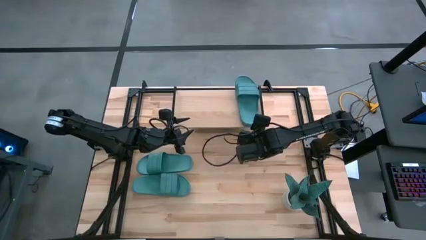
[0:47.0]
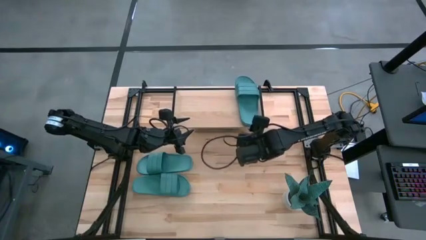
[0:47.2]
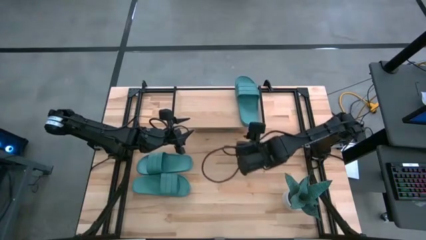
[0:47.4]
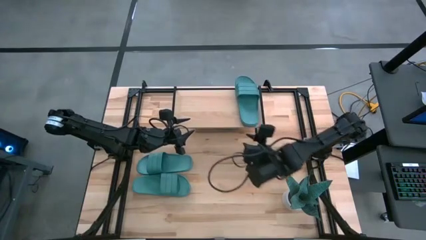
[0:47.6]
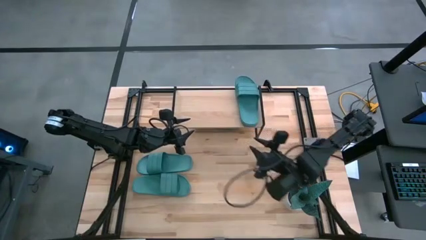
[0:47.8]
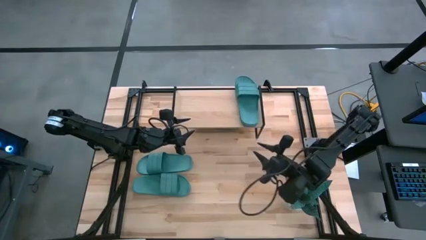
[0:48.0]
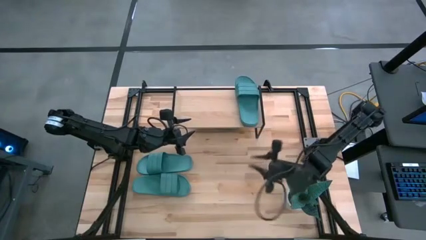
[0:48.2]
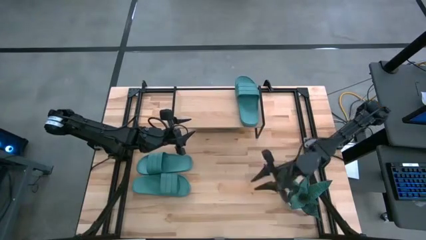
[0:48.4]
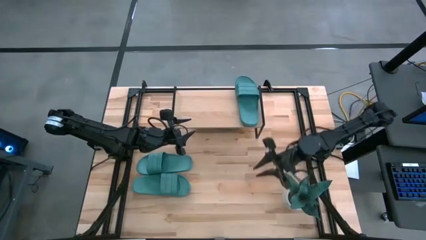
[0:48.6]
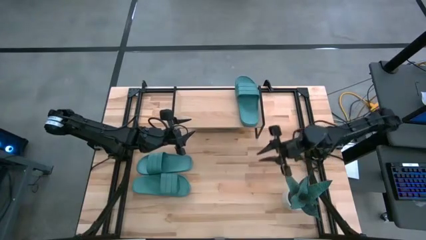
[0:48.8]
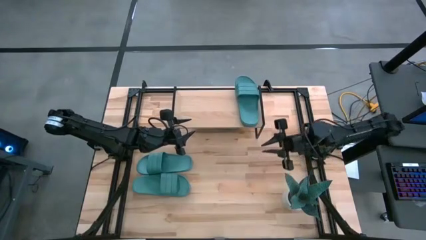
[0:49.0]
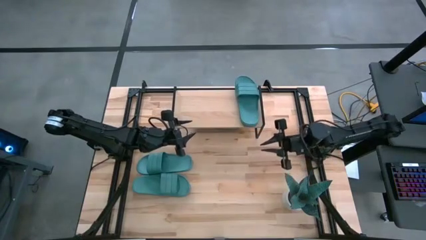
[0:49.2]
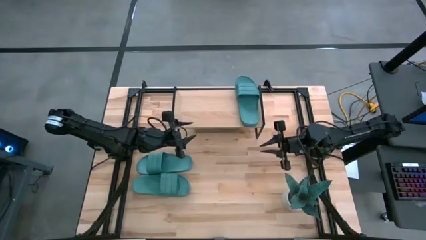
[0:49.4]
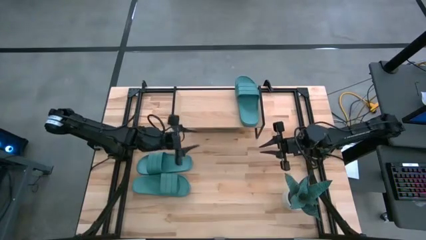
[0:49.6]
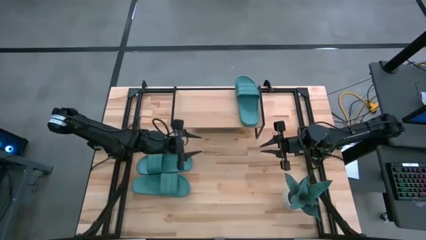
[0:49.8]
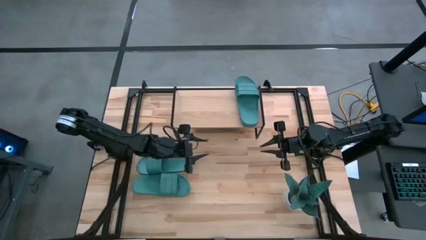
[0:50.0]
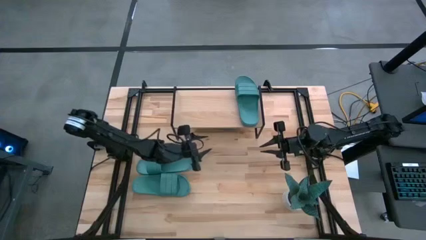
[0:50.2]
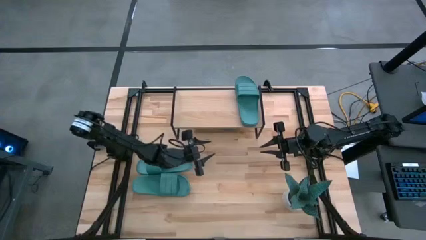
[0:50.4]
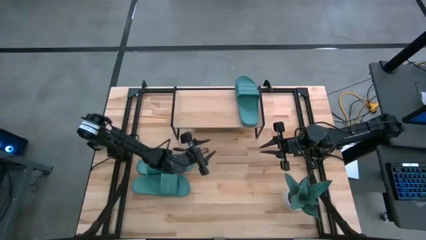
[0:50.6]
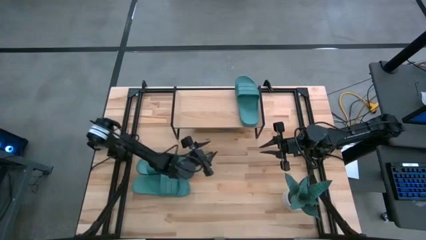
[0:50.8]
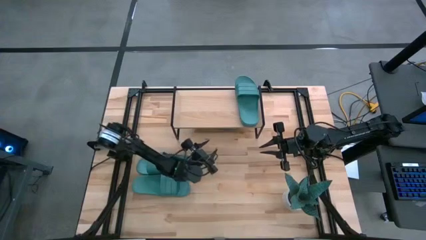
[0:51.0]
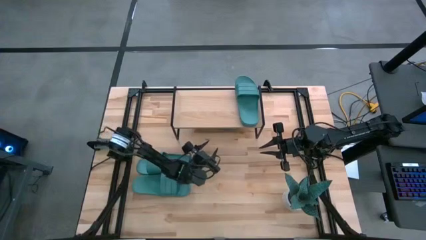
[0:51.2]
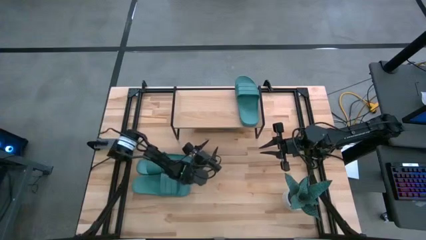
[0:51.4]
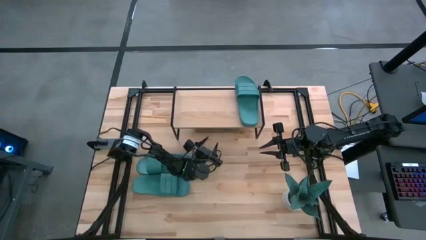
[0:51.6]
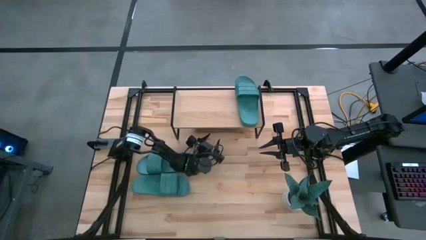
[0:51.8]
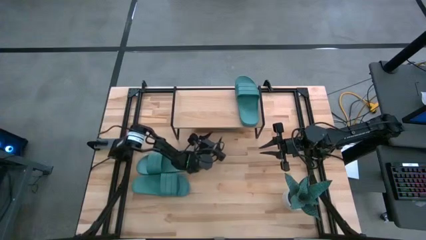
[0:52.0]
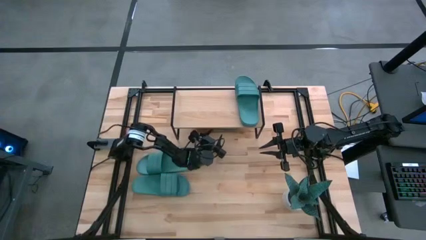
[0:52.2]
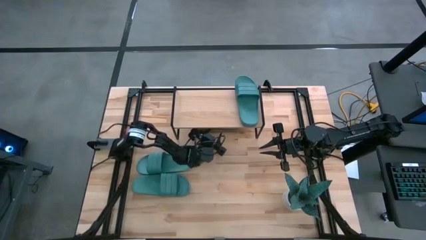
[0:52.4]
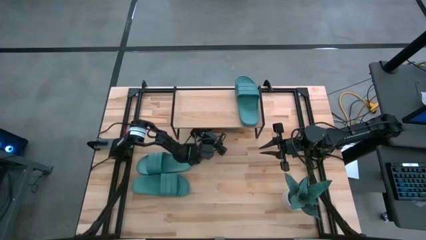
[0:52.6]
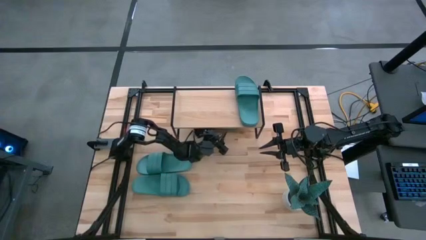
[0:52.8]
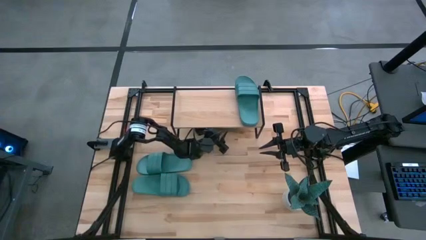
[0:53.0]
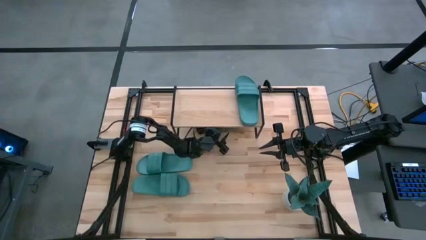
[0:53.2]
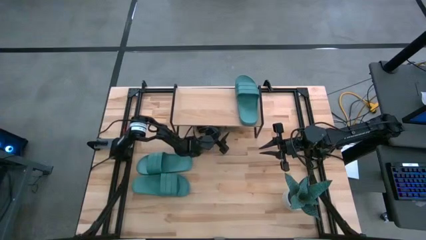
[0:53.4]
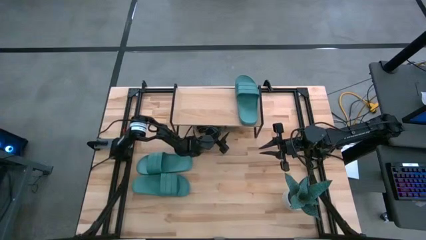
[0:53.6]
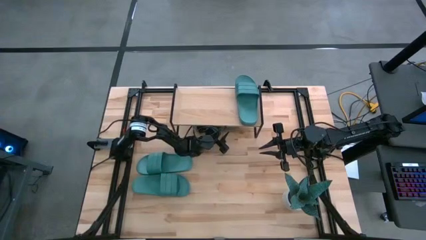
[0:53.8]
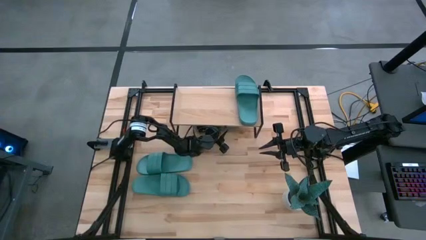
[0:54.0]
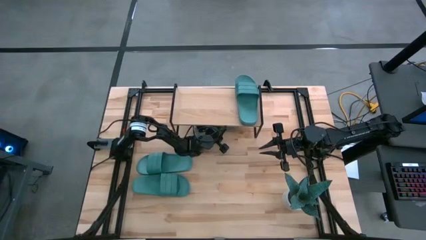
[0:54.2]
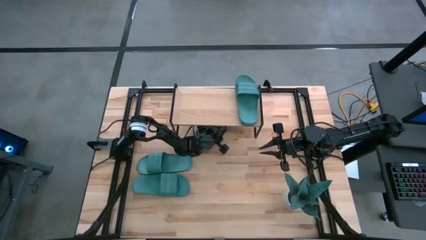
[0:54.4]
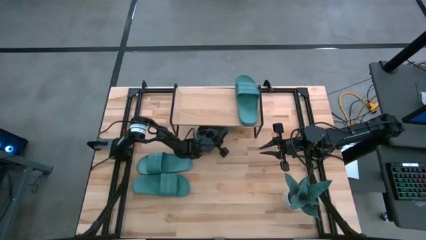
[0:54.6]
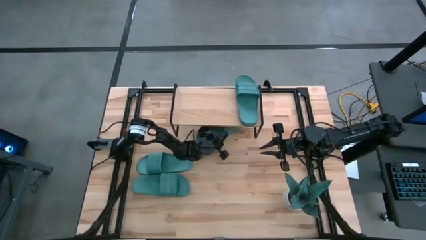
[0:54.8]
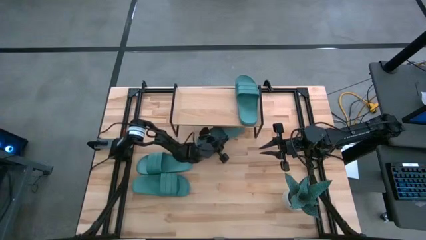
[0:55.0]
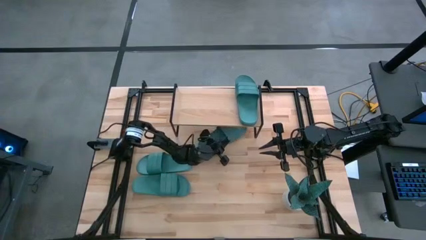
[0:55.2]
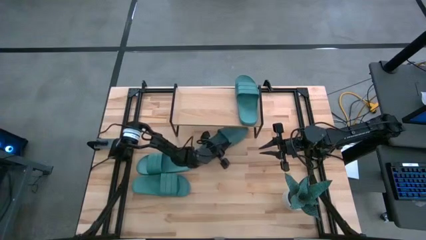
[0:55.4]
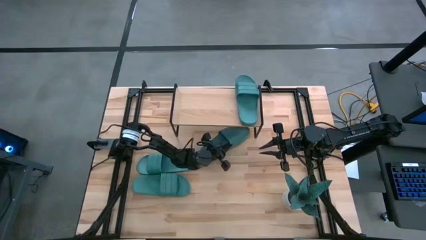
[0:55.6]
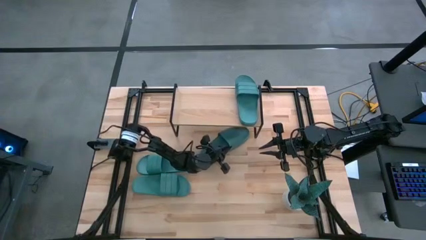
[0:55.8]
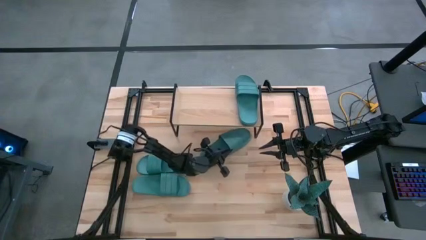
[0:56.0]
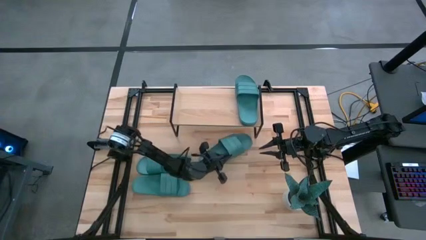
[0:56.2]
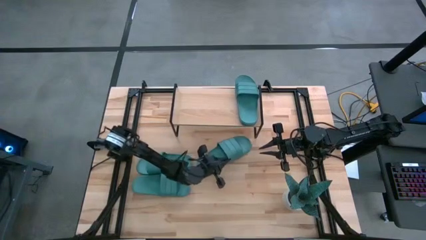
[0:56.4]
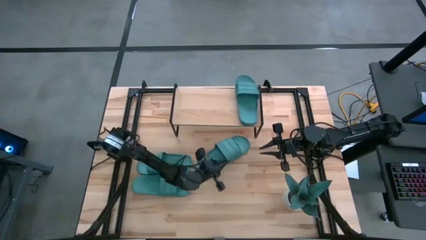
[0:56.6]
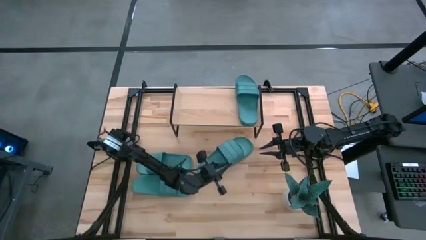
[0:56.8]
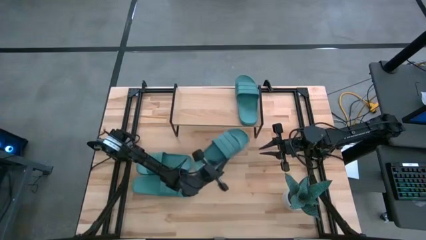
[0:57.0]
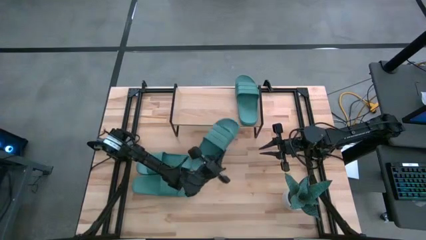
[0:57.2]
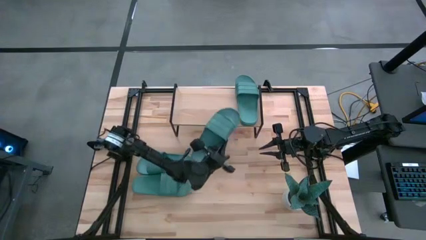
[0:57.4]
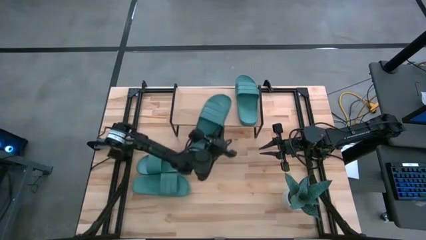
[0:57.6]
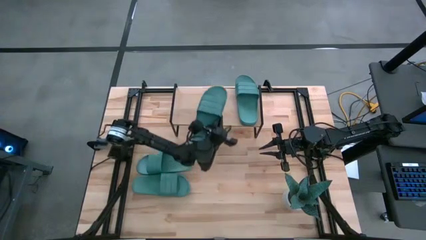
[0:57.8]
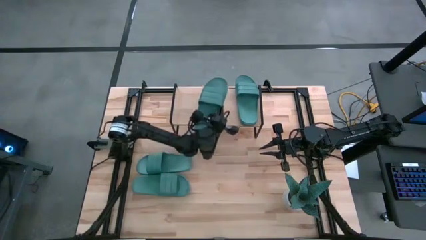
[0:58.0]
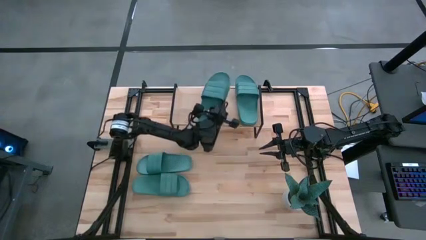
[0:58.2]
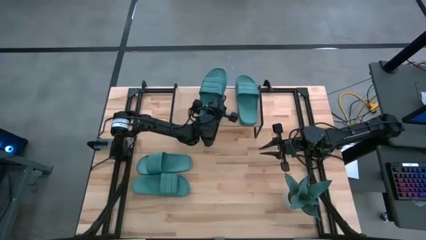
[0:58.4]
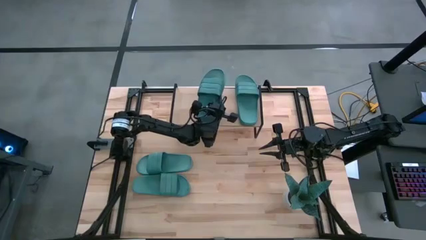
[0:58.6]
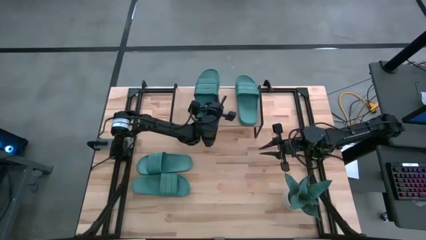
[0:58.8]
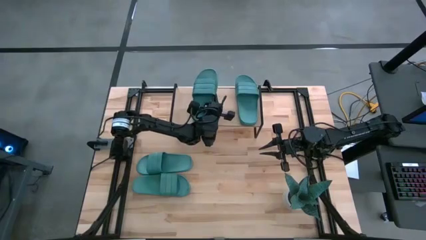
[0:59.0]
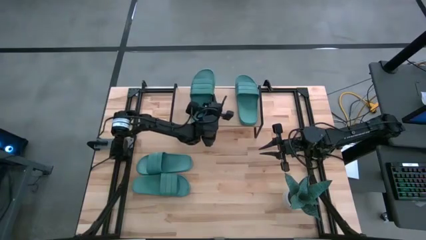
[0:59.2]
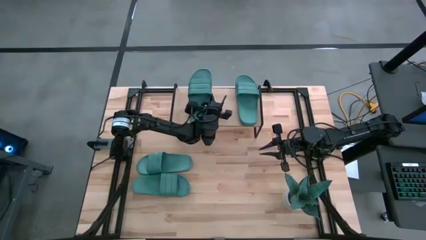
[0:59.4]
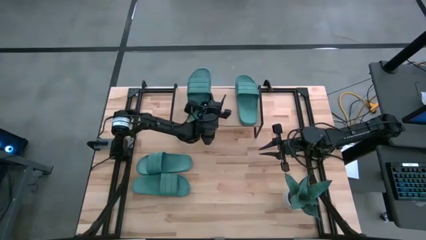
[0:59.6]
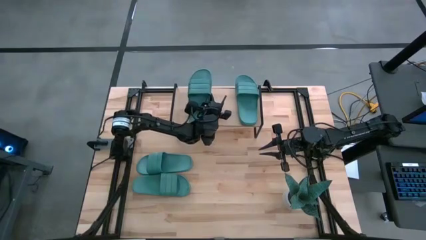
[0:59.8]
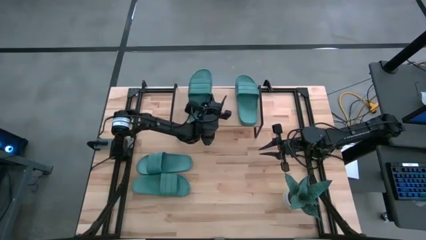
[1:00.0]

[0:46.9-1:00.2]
Task: Pick and place slides into the shelf
Put the green slides on the shelf
